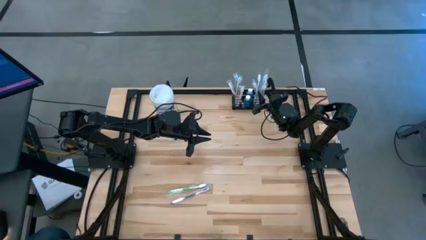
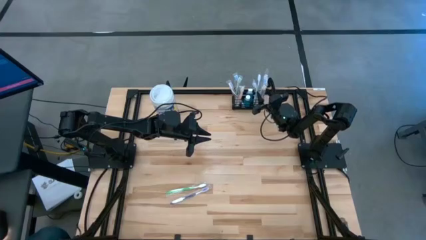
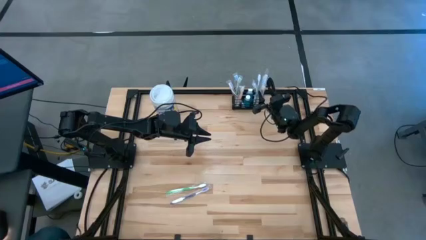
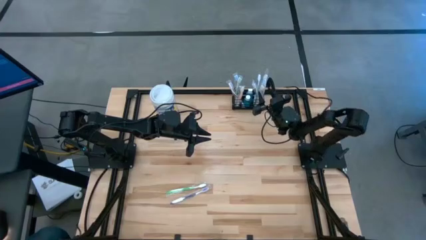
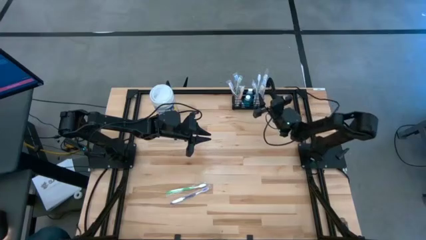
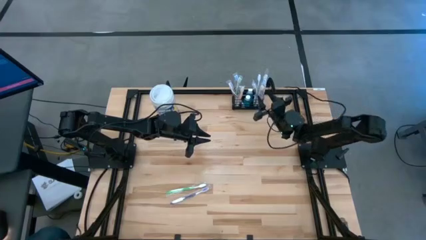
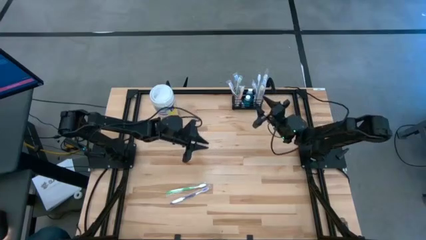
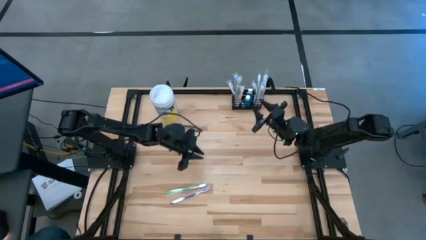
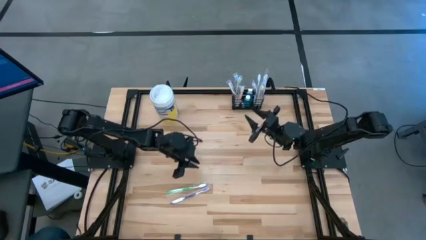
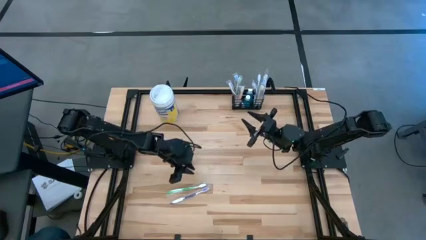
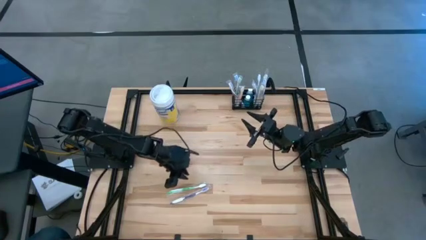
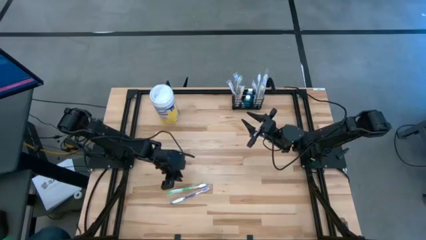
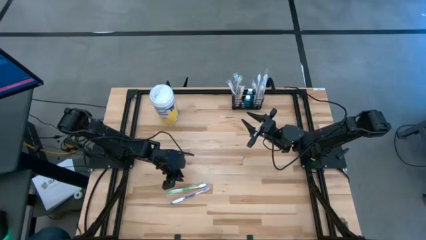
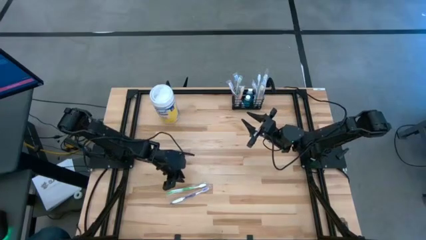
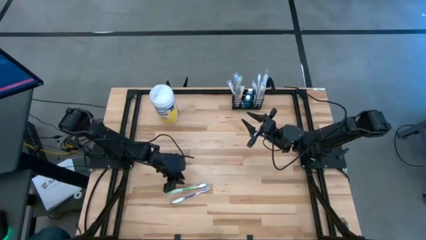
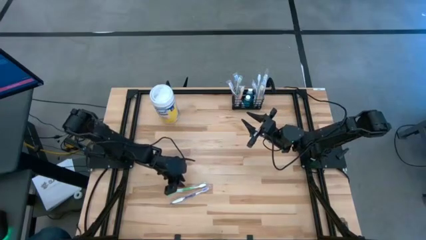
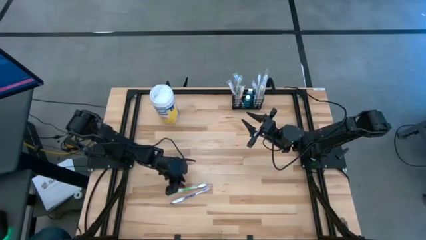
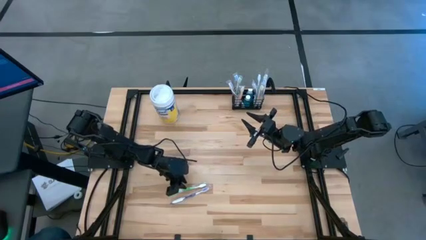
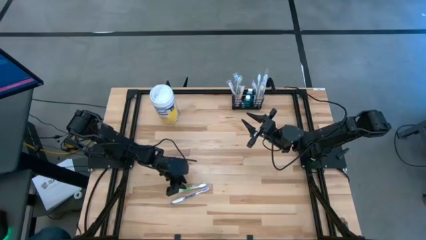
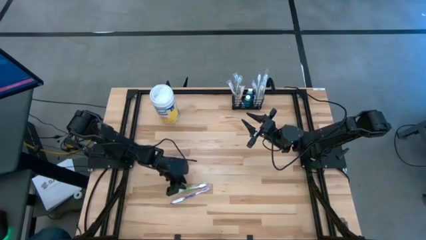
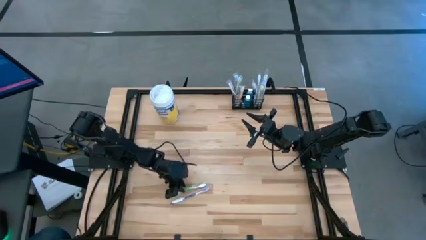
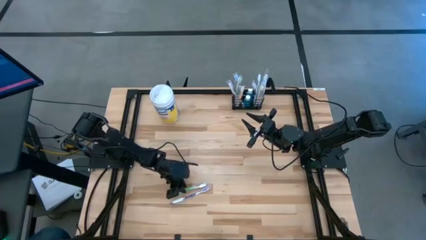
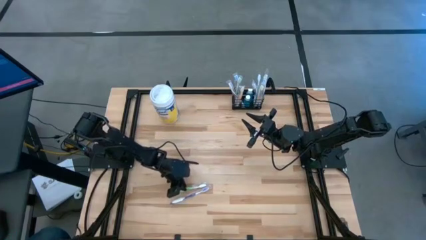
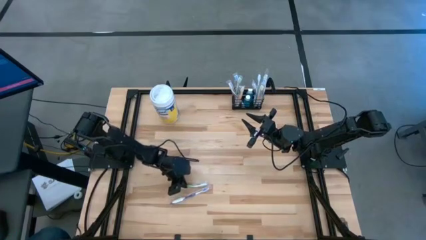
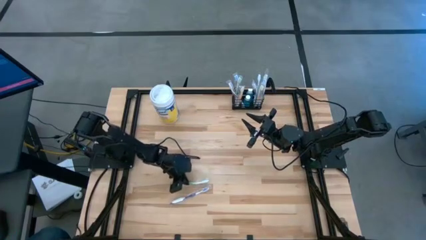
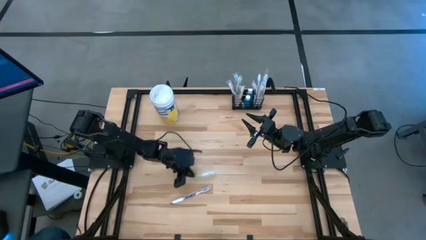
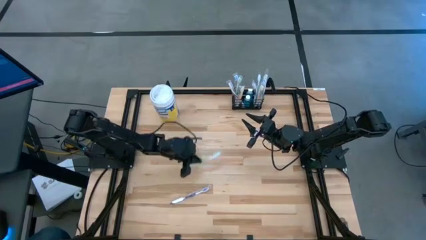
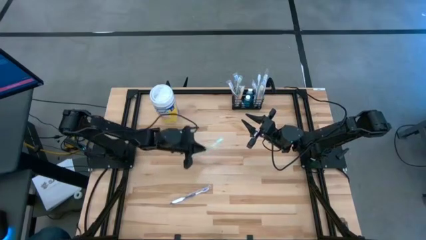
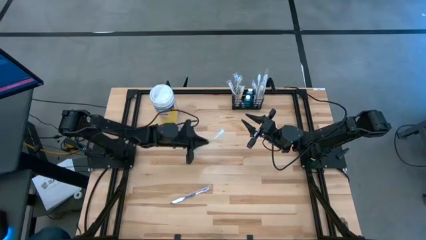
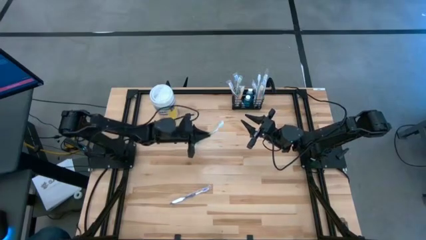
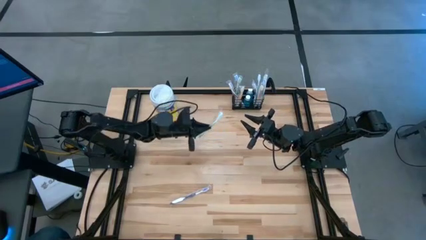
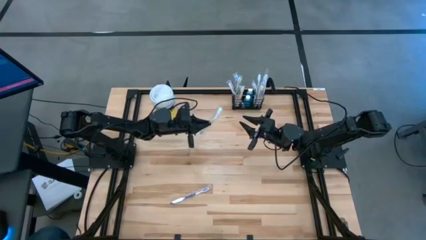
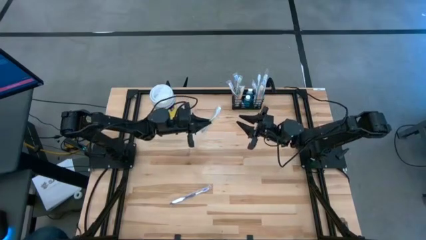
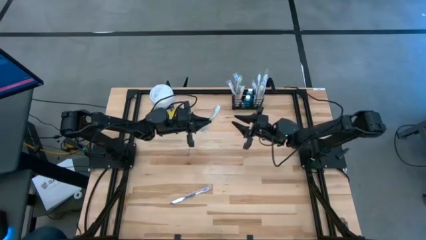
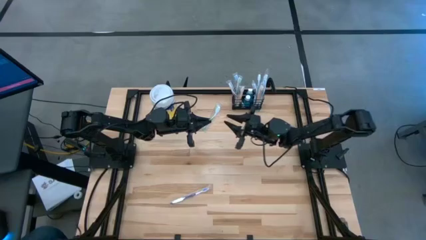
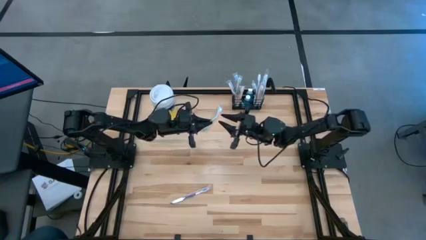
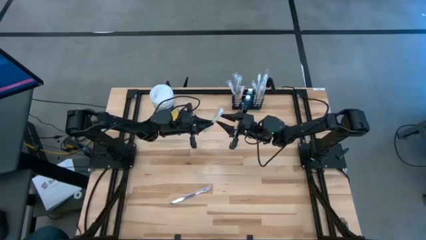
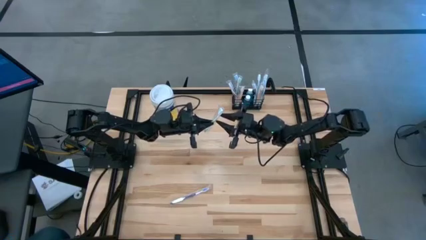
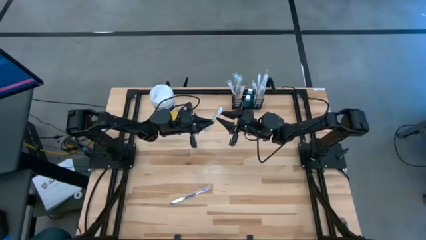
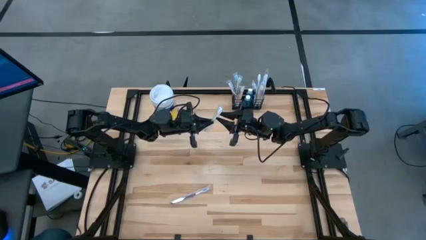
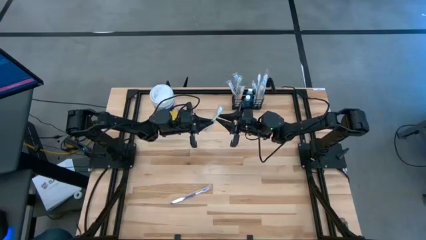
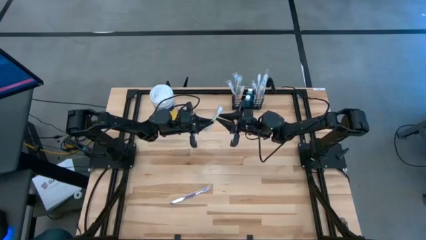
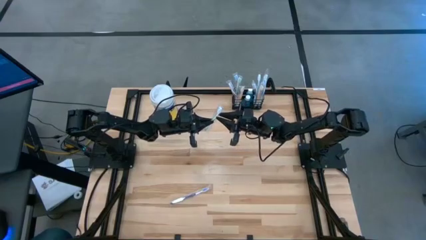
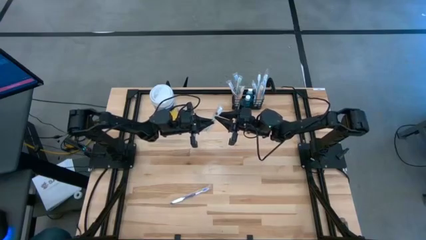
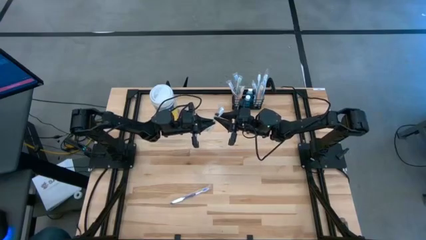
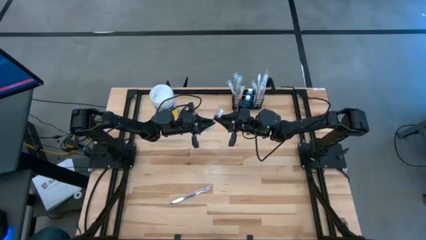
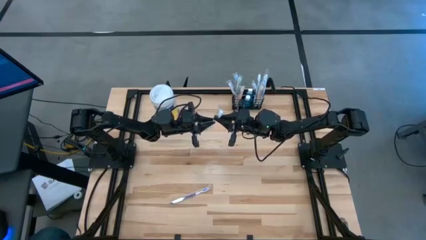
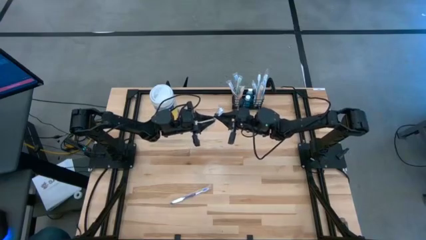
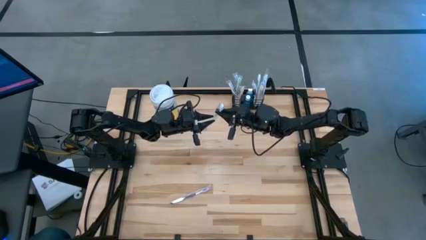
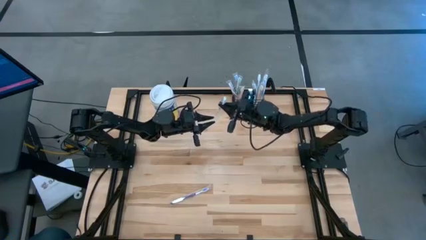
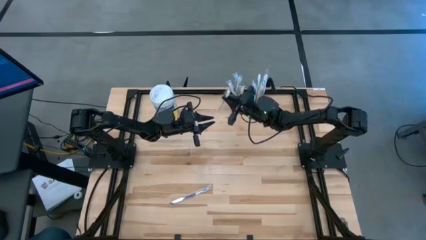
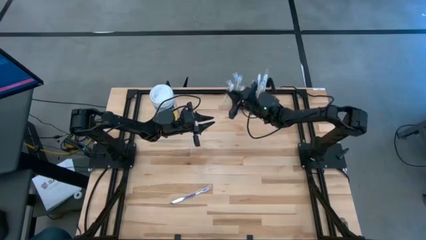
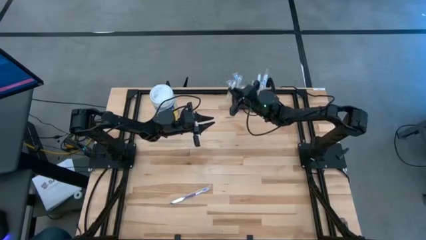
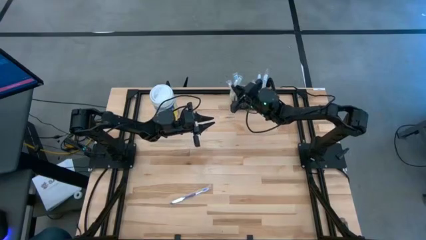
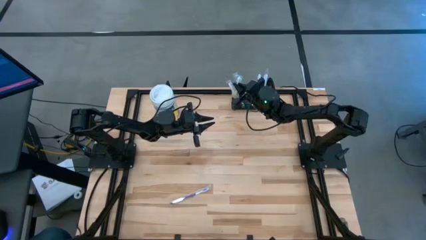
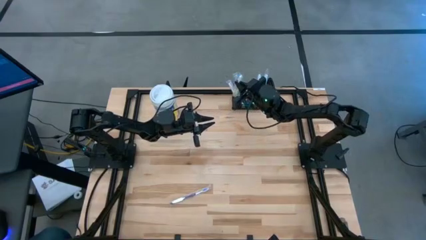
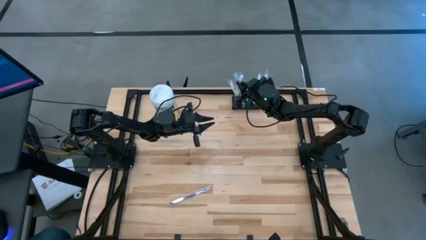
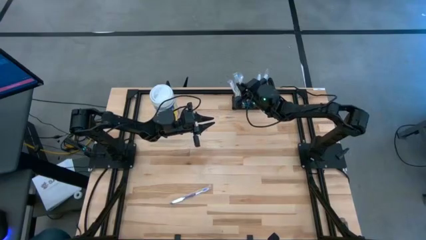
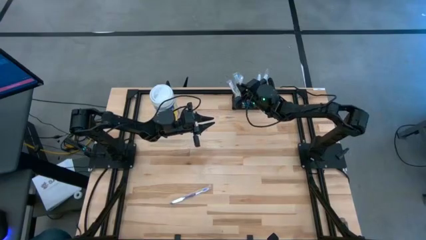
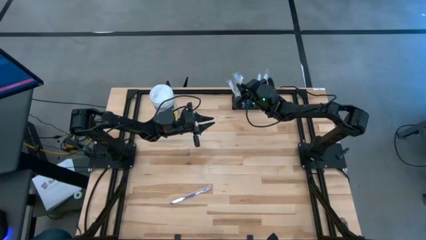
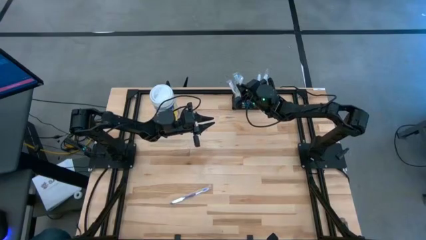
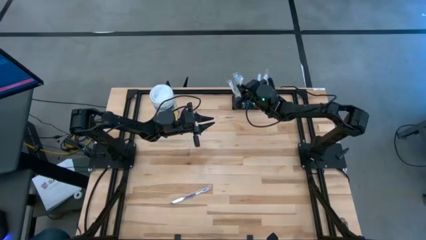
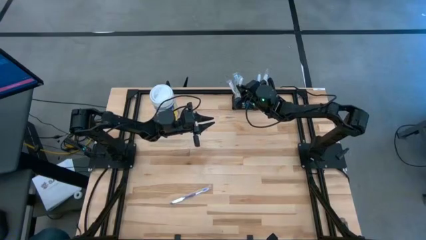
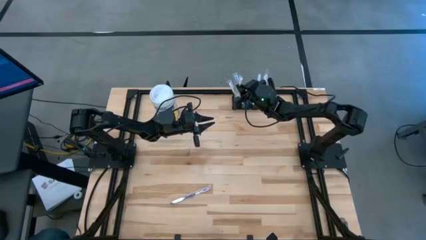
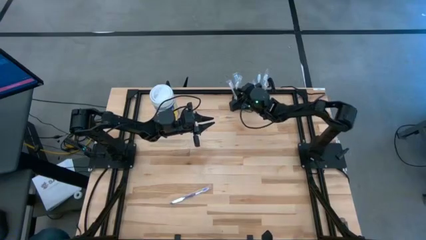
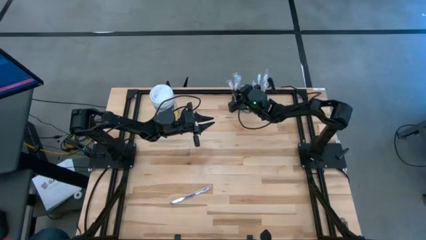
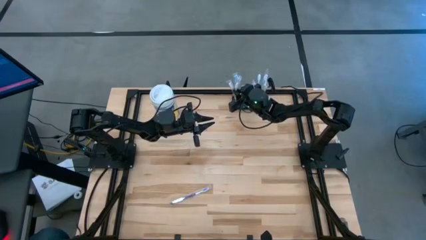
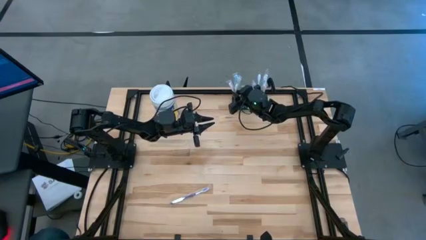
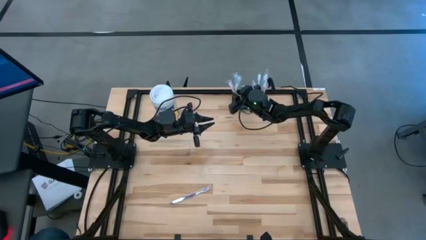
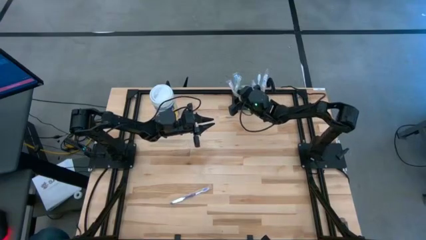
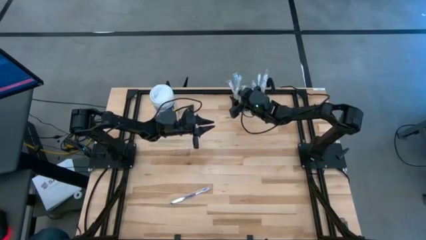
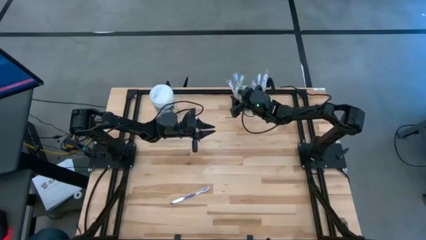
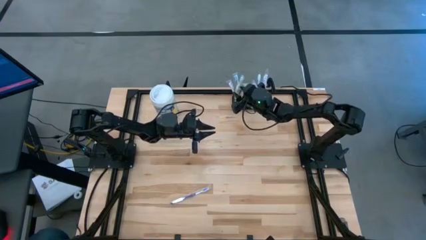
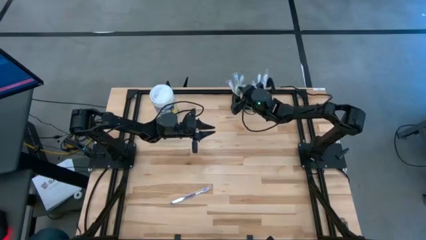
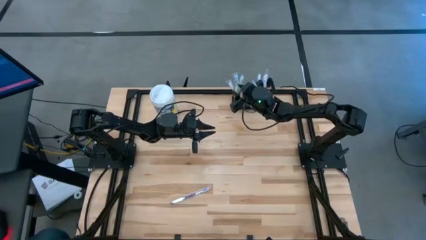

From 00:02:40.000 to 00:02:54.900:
Task: Pick & Place toothbrushing station
Put the green toothbrush into the black mesh organizer

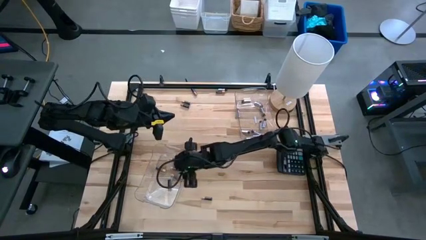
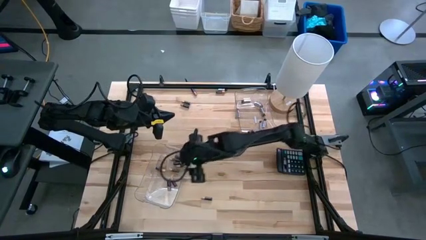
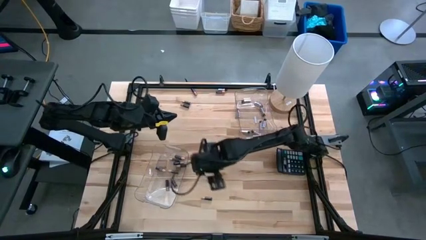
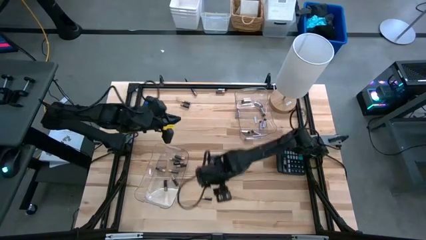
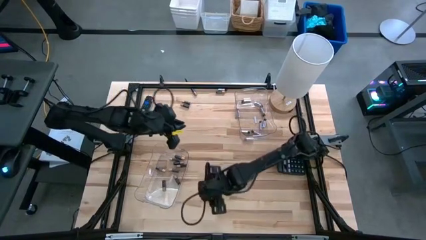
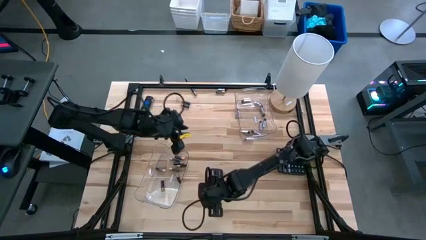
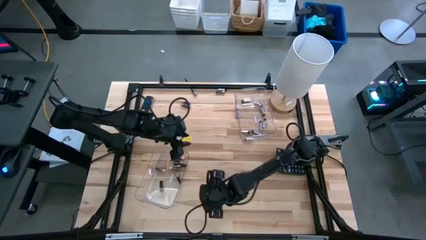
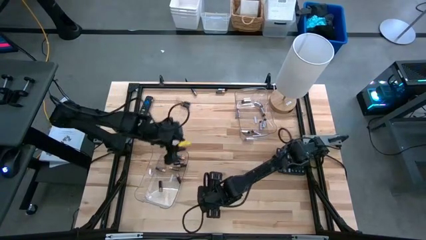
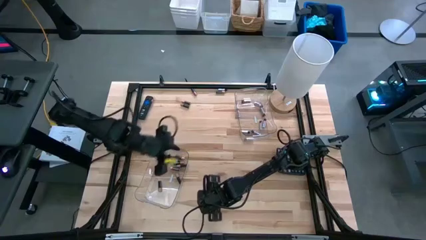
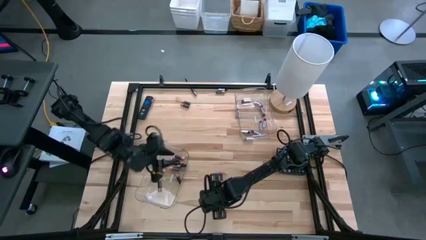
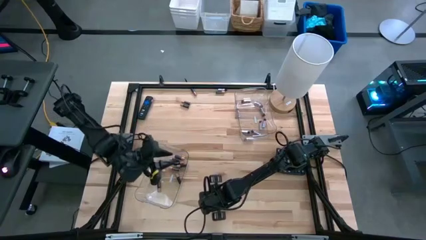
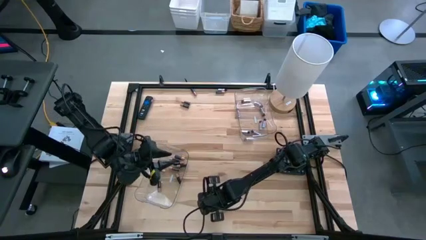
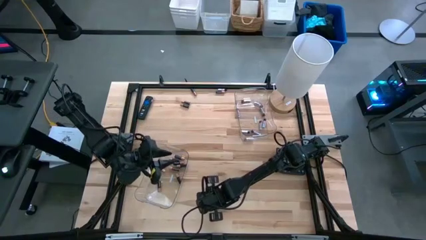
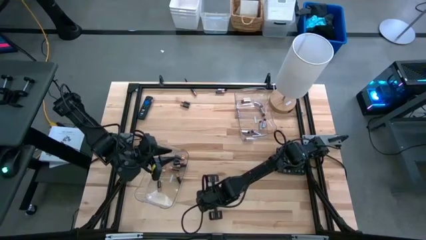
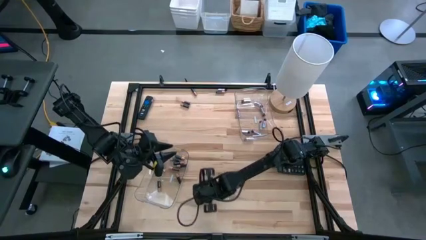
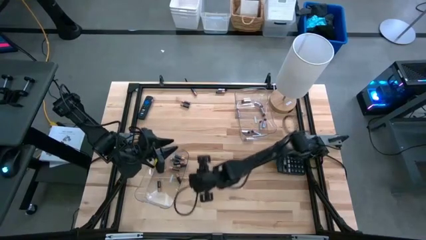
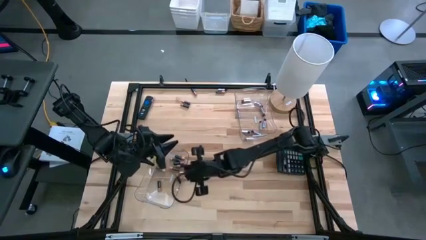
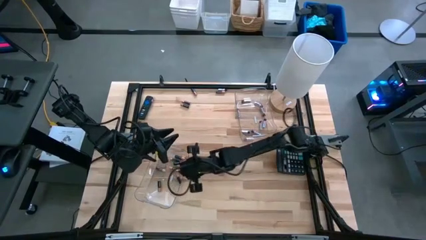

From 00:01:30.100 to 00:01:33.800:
Task: Sort batteries
Put the brown battery into the left transparent bin
